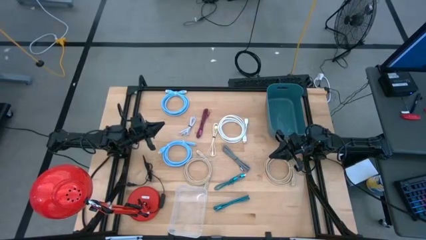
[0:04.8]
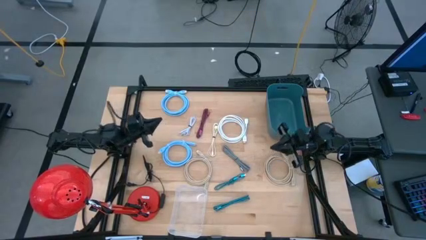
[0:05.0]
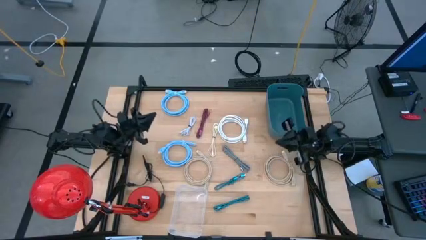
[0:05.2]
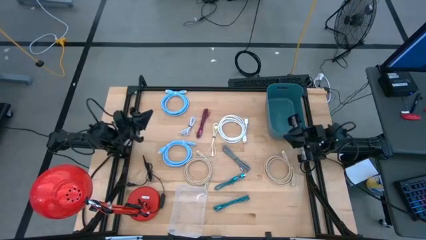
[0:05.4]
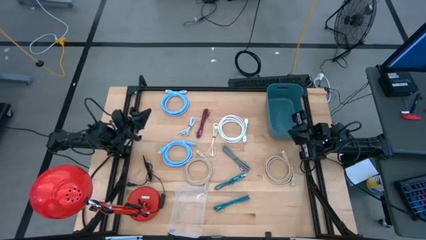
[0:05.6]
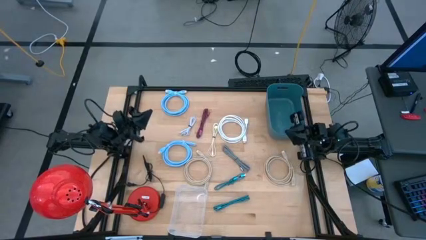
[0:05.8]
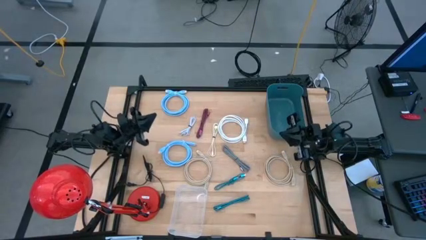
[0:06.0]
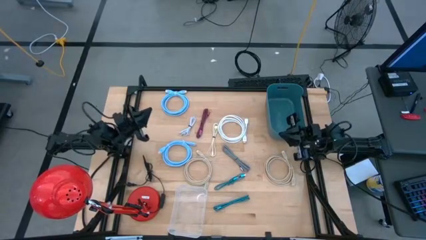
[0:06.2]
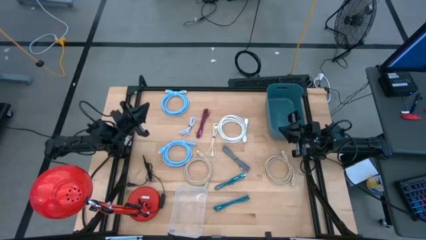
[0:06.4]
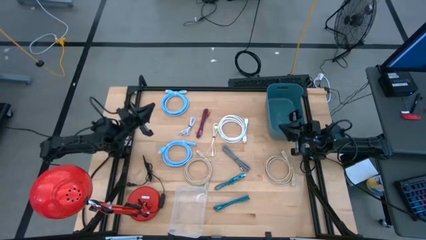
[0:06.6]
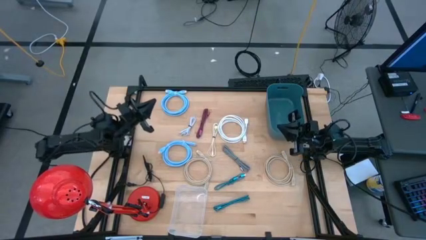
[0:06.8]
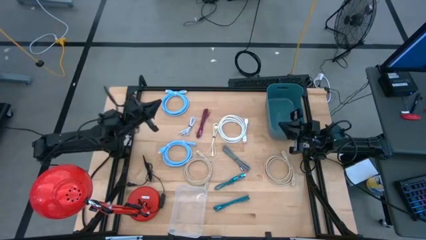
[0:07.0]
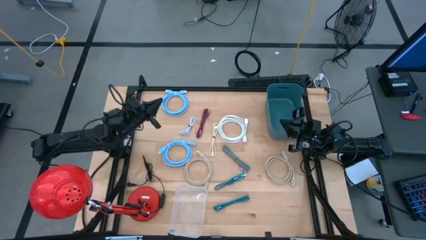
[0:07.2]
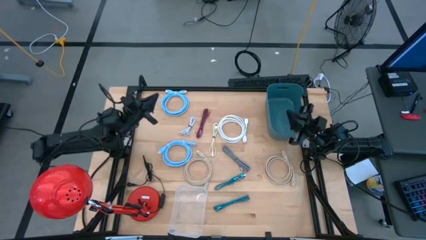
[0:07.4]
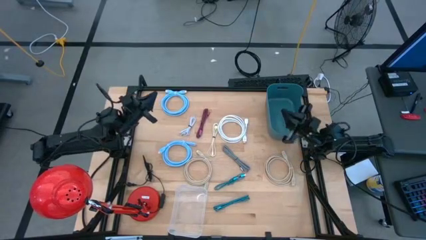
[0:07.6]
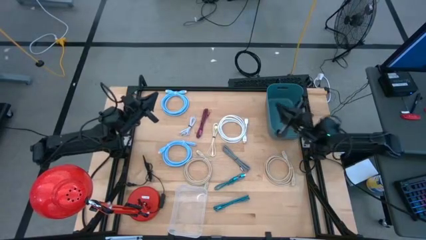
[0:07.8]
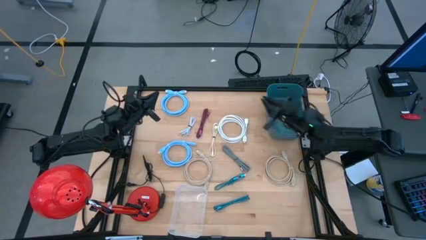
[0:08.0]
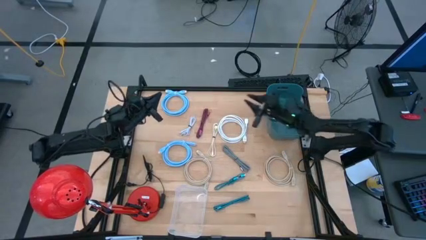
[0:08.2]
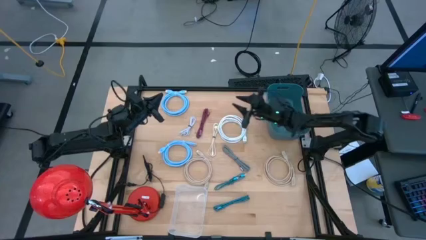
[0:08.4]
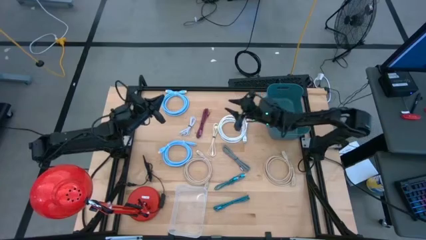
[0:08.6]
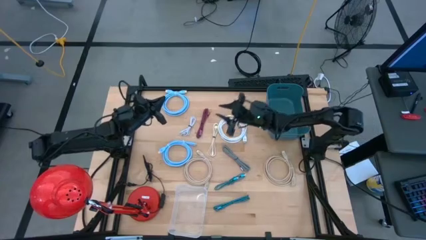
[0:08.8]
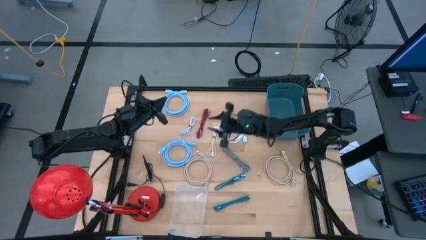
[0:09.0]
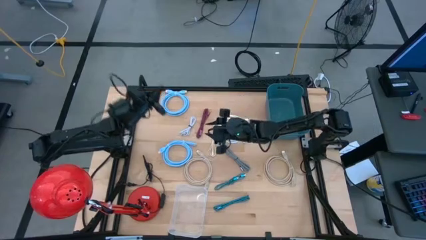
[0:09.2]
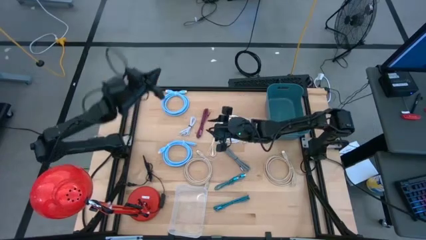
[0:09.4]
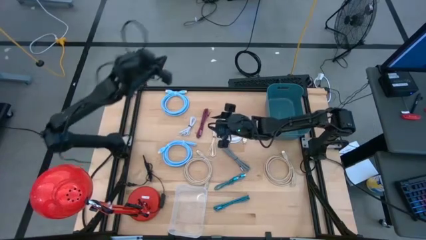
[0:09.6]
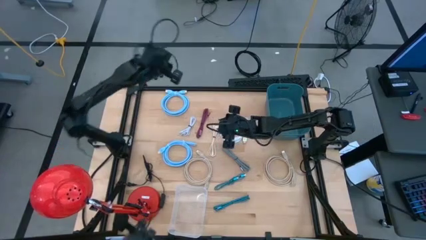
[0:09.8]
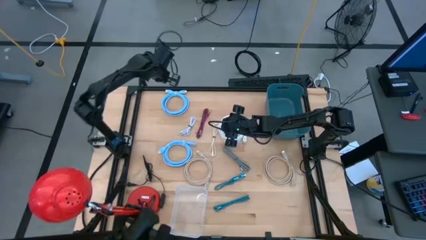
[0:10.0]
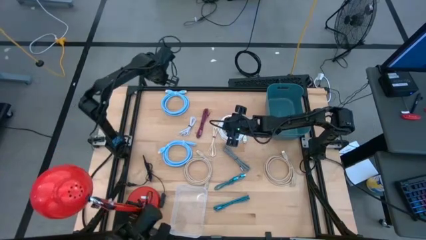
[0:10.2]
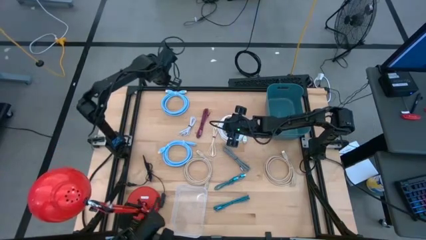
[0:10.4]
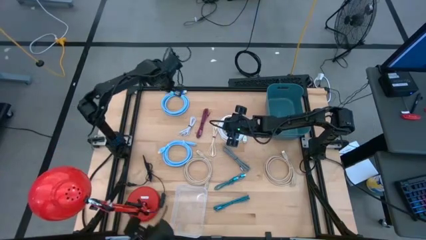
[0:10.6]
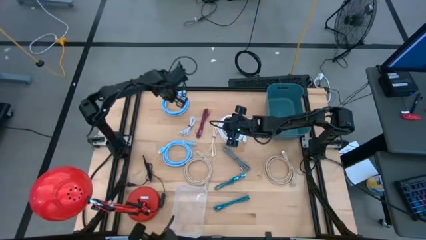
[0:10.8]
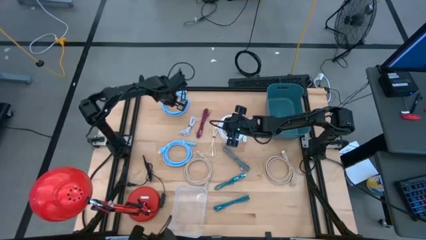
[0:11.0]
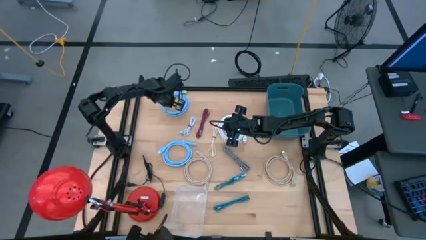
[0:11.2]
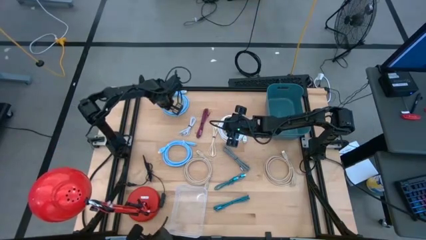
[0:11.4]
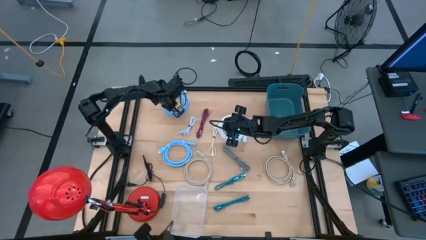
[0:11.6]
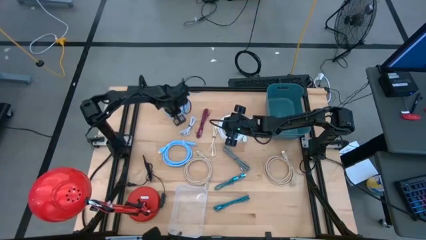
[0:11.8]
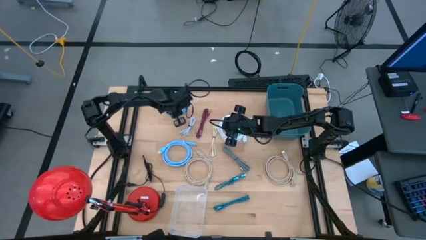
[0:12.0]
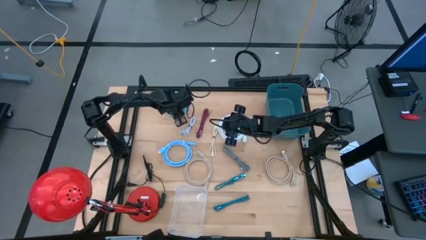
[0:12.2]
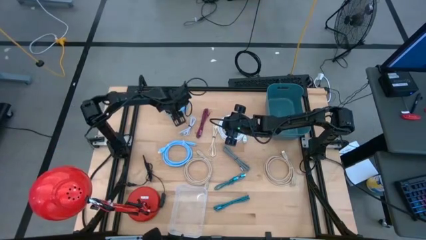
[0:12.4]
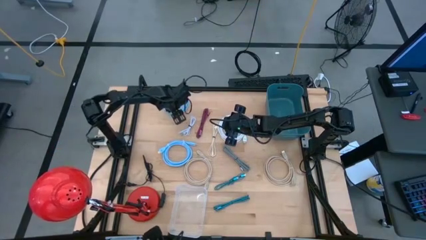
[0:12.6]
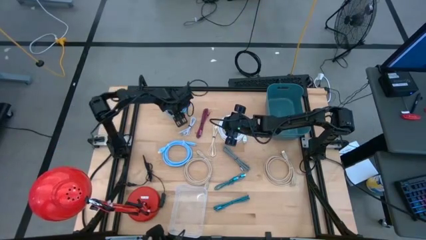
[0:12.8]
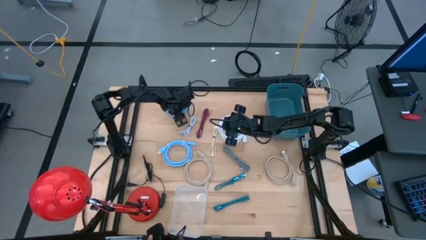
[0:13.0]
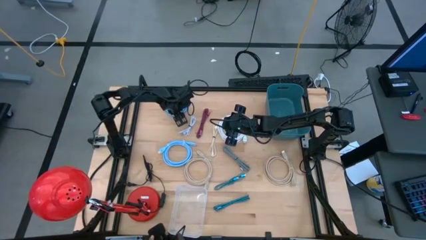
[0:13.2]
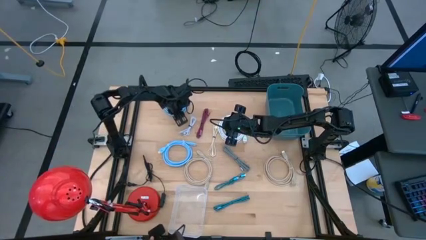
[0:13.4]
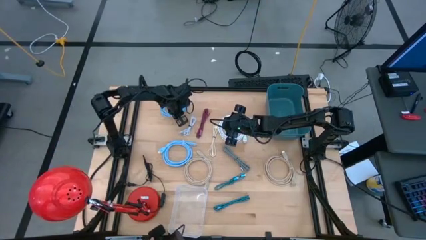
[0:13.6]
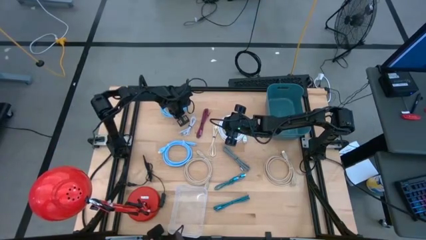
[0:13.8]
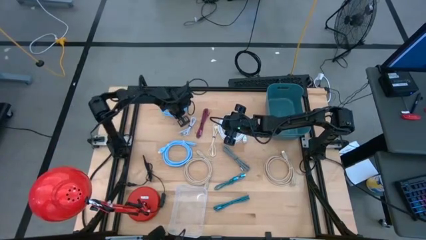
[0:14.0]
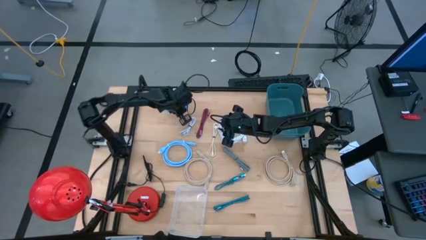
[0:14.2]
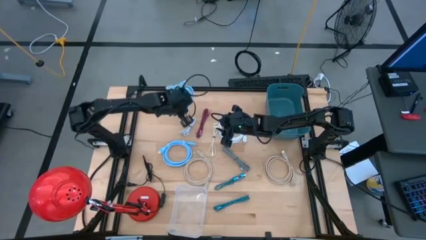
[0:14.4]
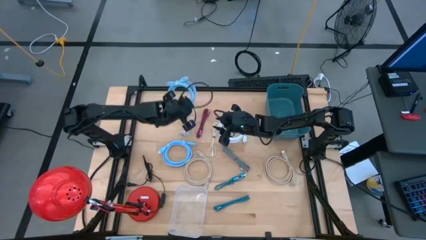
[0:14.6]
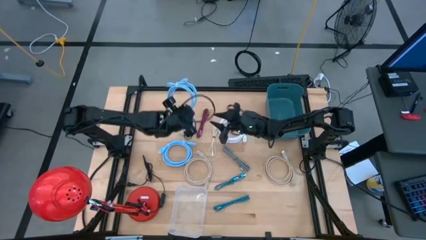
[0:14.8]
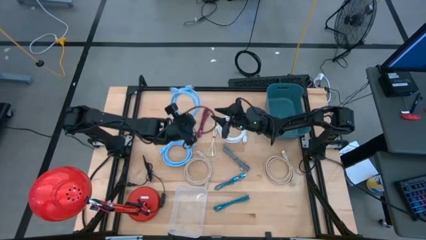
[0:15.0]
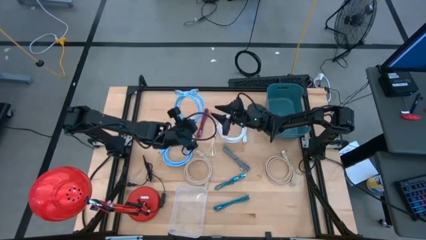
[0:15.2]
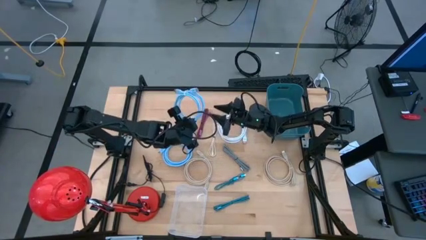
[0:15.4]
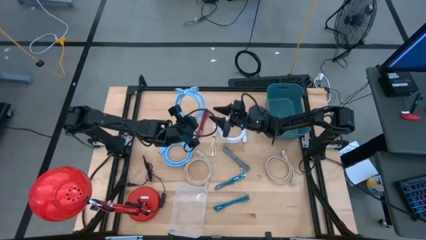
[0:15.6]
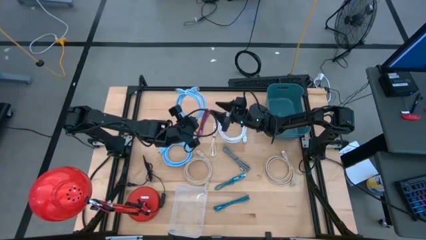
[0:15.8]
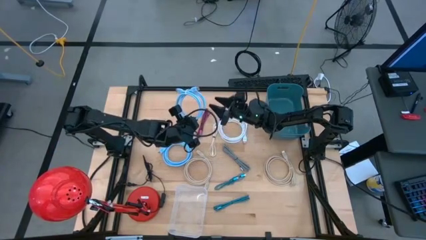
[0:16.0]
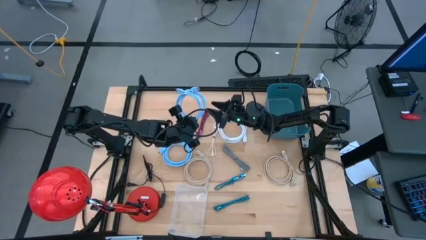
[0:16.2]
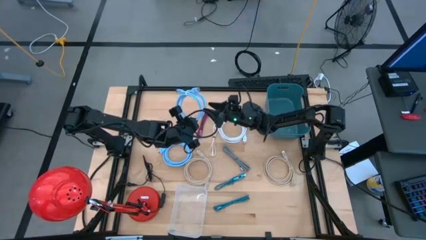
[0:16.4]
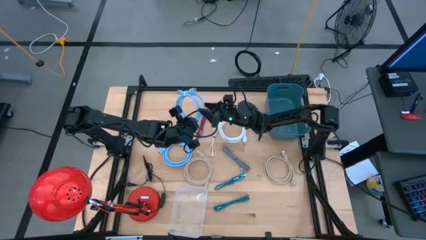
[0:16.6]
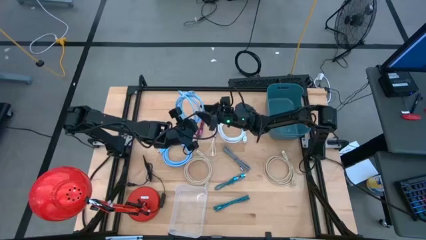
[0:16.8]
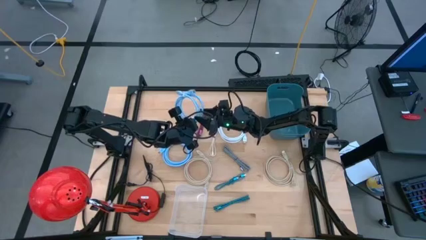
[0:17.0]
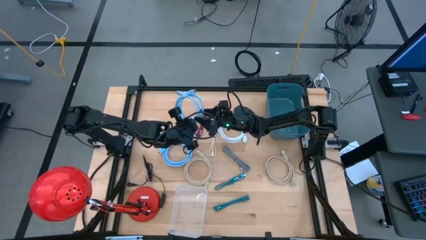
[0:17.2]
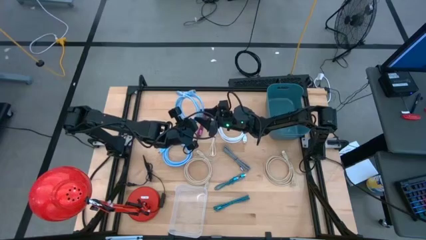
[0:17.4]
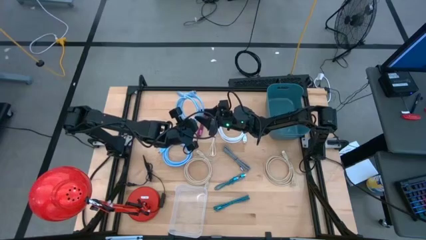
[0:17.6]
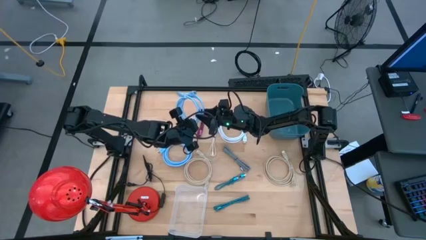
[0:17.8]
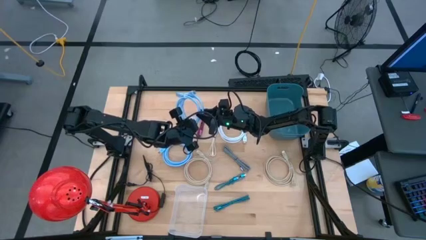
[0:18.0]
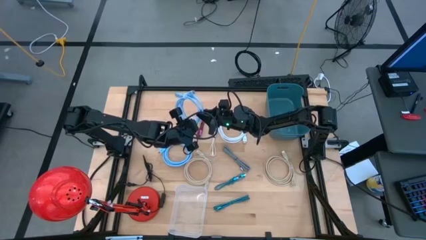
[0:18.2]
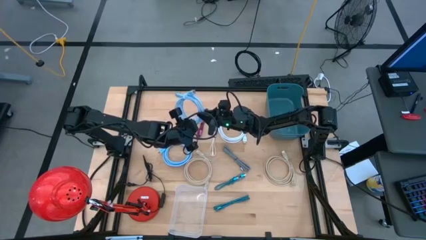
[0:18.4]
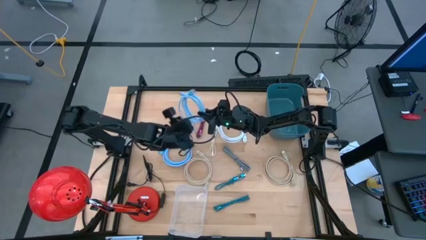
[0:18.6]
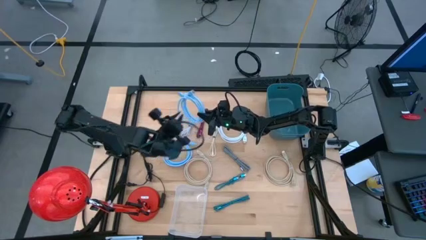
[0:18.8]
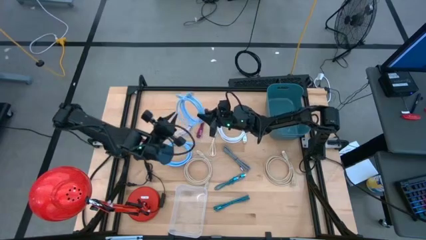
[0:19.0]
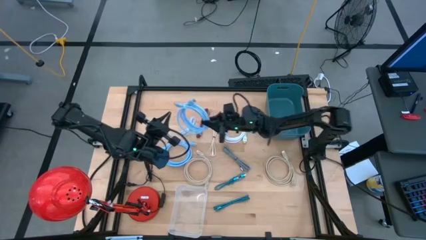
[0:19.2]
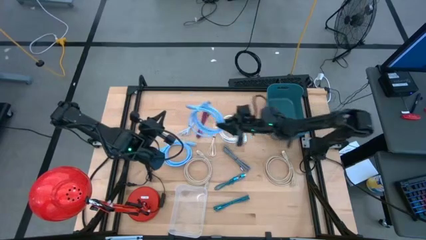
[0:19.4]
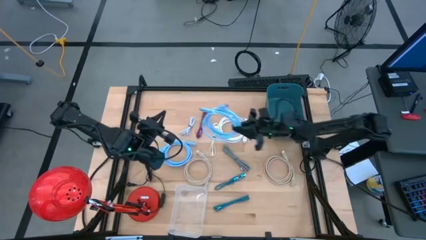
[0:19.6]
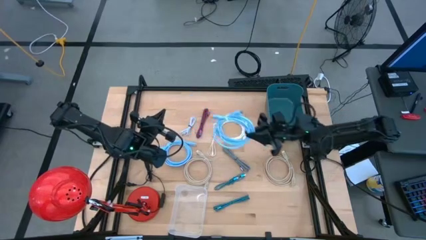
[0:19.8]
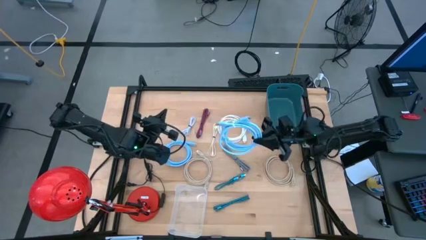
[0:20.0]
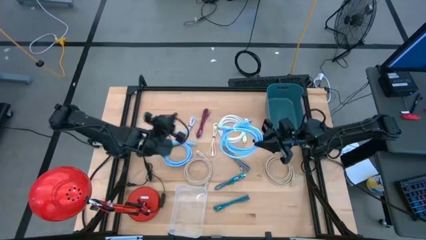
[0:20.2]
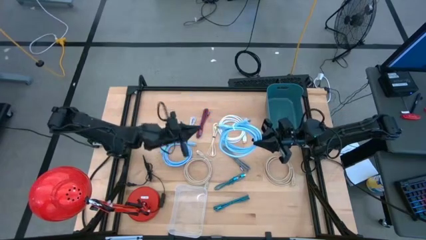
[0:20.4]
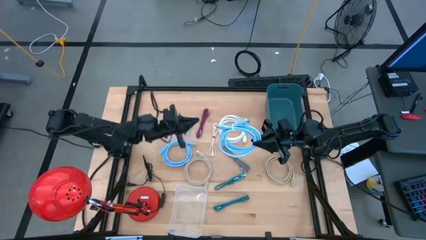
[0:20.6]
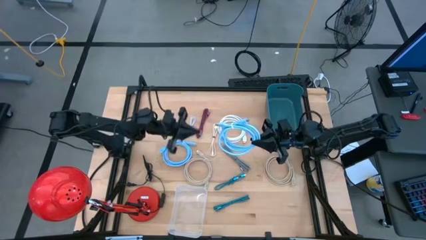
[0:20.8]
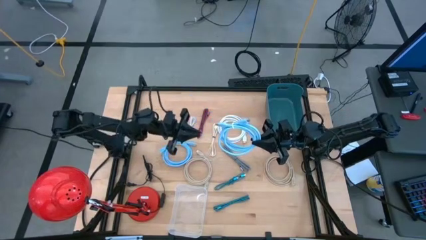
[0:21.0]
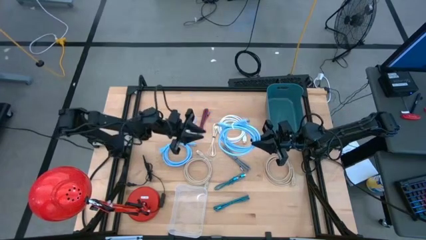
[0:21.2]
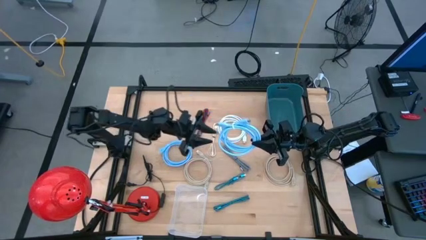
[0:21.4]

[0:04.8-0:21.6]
Task: Pick & Place USB Port
Put the top blue usb cable into the blue bin
